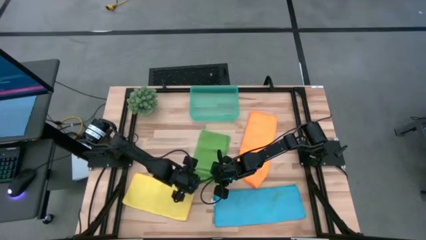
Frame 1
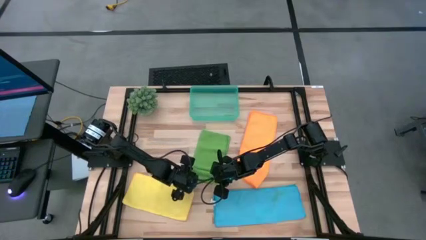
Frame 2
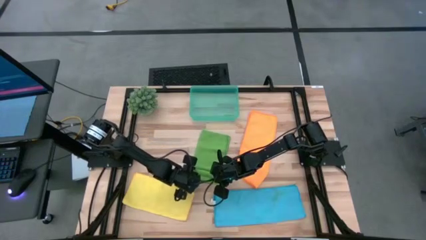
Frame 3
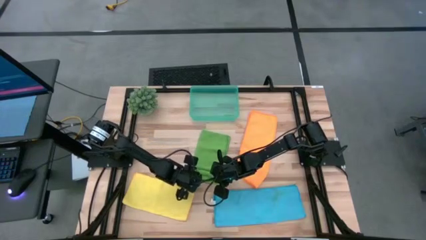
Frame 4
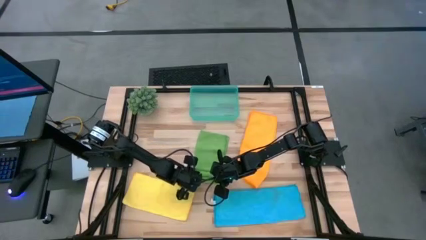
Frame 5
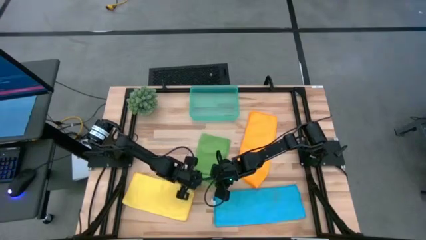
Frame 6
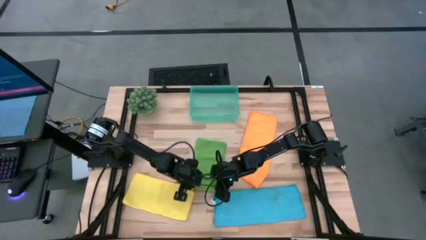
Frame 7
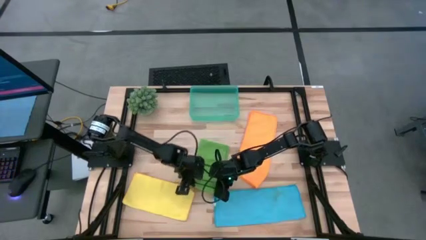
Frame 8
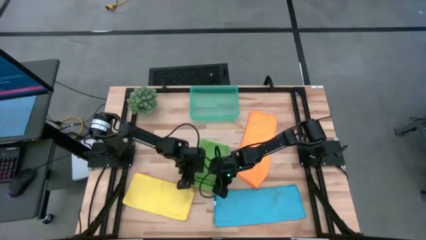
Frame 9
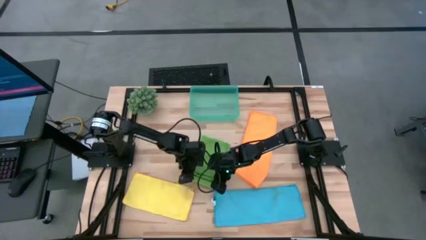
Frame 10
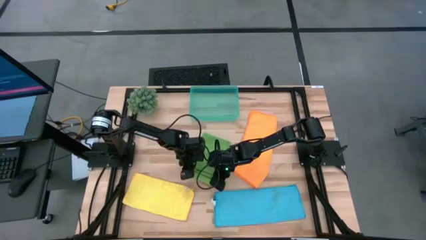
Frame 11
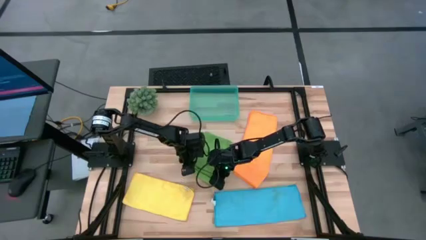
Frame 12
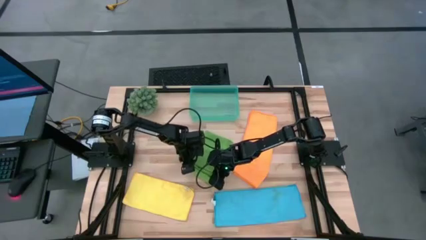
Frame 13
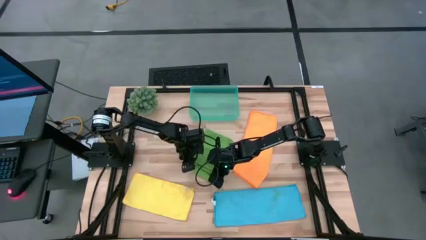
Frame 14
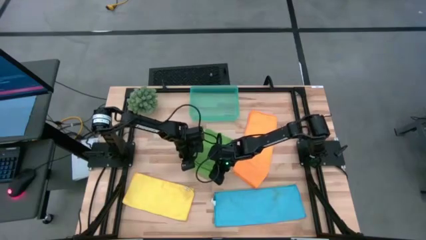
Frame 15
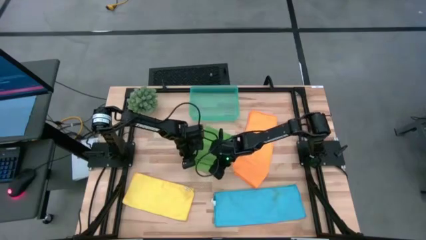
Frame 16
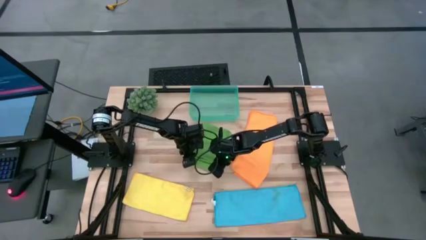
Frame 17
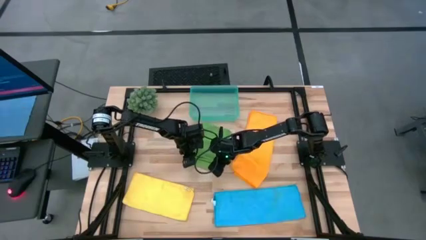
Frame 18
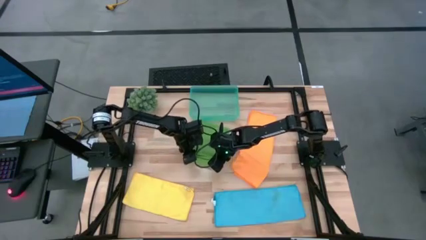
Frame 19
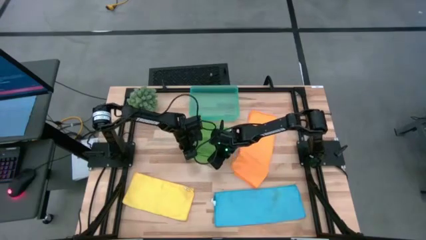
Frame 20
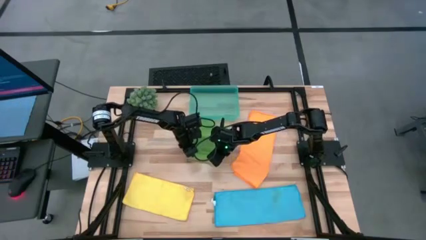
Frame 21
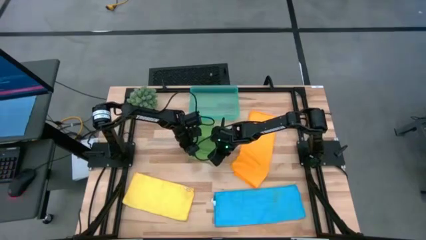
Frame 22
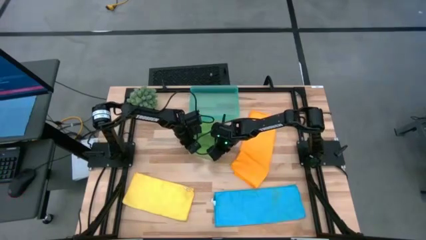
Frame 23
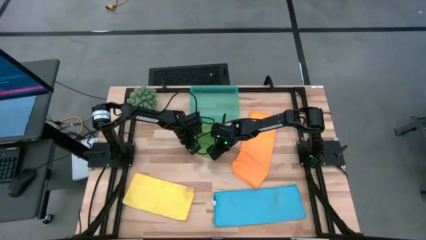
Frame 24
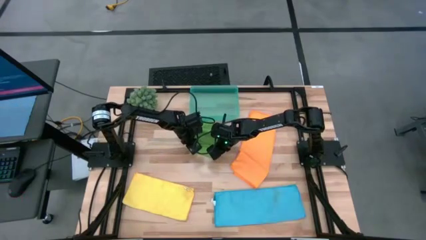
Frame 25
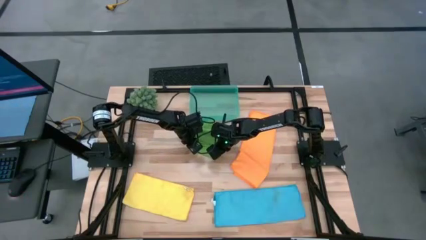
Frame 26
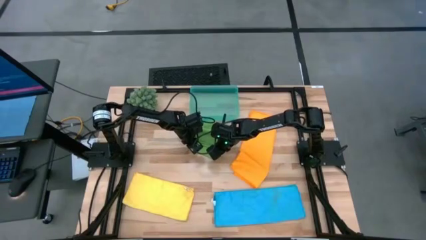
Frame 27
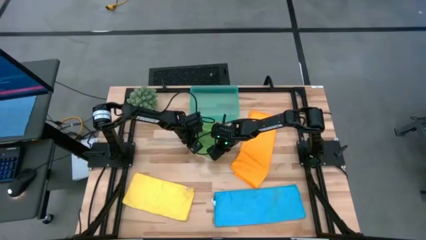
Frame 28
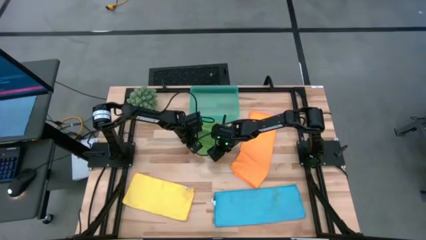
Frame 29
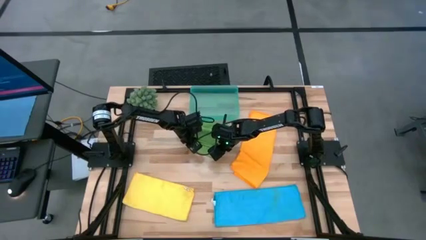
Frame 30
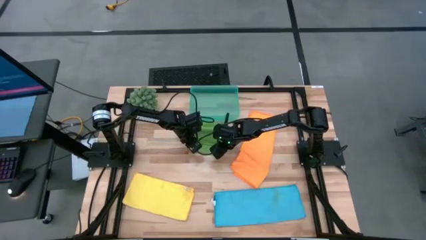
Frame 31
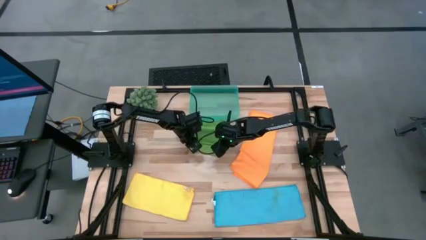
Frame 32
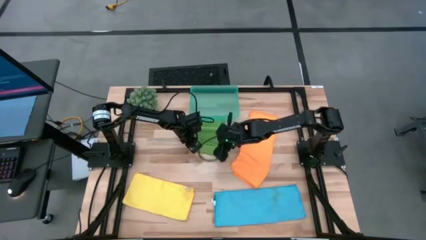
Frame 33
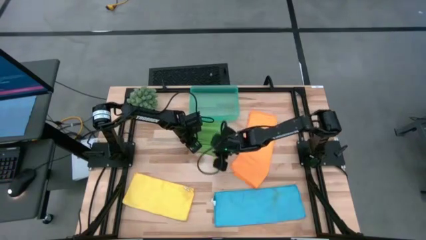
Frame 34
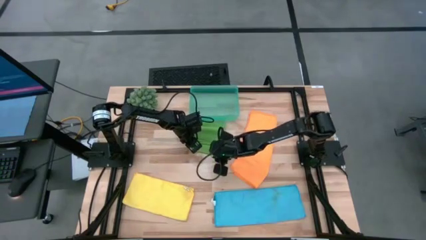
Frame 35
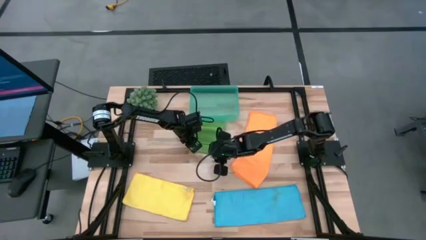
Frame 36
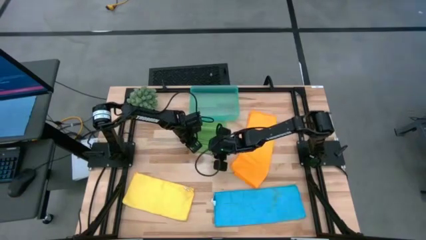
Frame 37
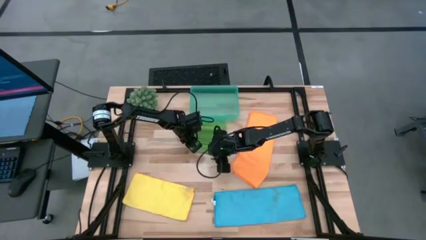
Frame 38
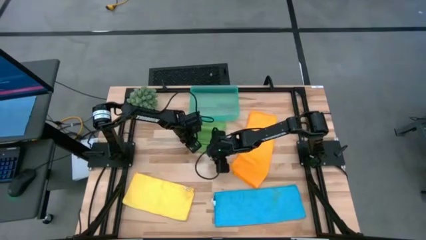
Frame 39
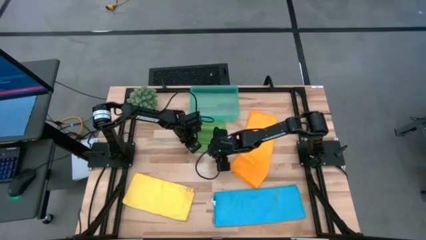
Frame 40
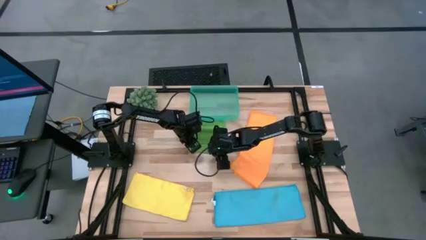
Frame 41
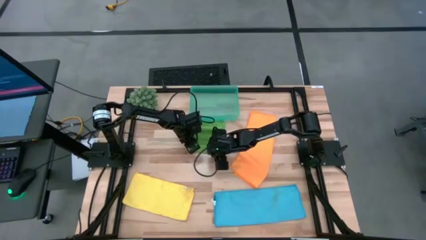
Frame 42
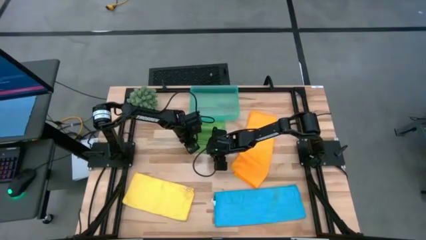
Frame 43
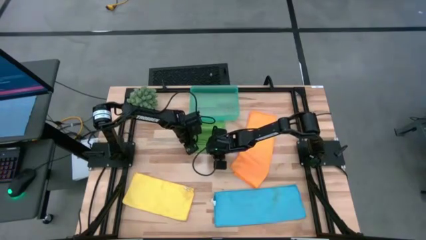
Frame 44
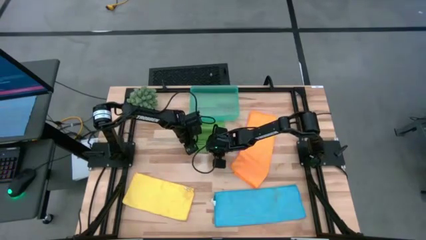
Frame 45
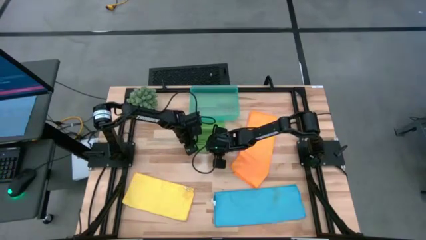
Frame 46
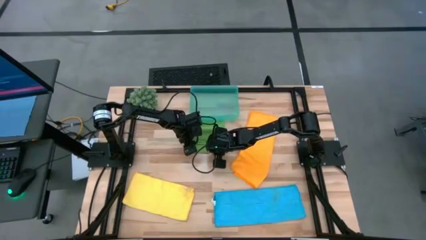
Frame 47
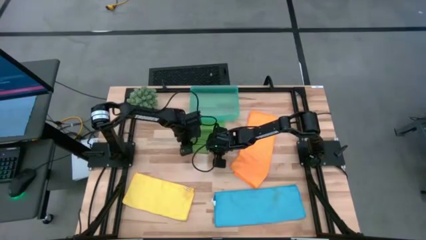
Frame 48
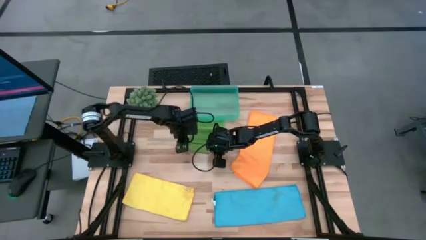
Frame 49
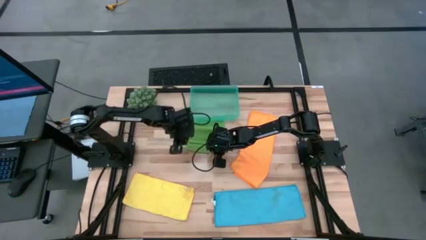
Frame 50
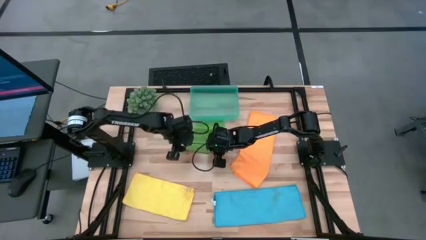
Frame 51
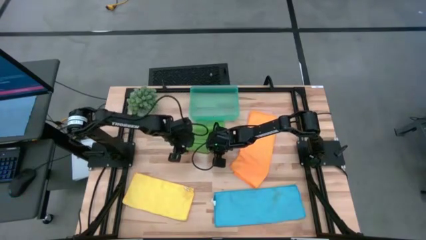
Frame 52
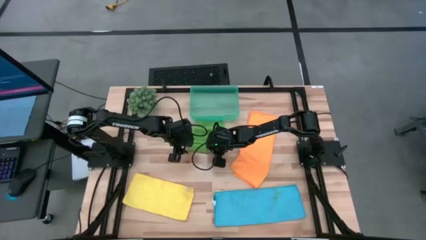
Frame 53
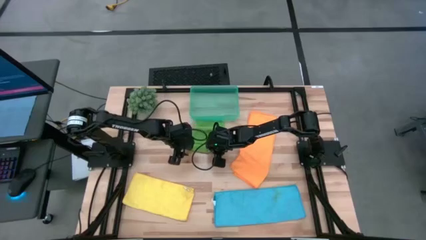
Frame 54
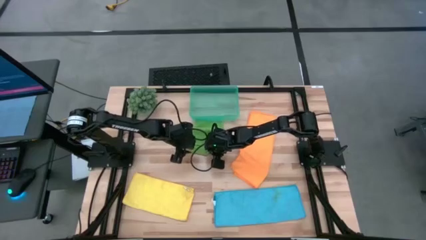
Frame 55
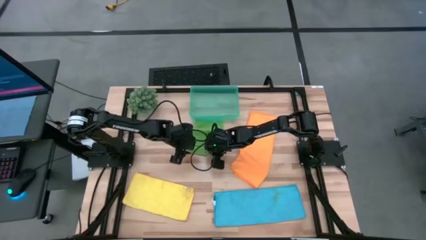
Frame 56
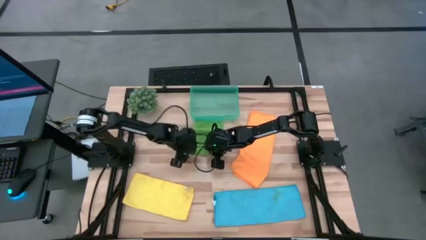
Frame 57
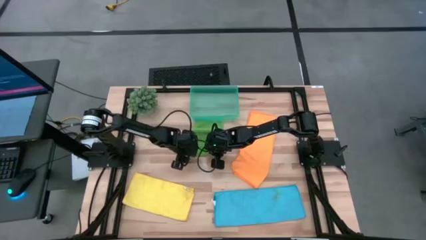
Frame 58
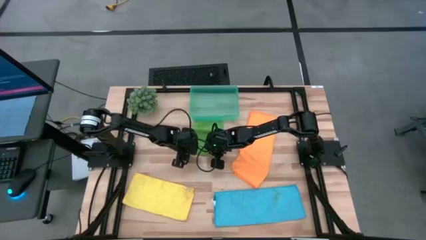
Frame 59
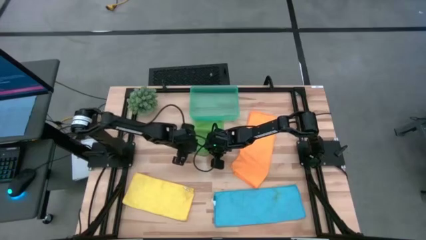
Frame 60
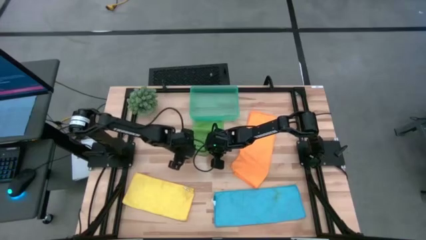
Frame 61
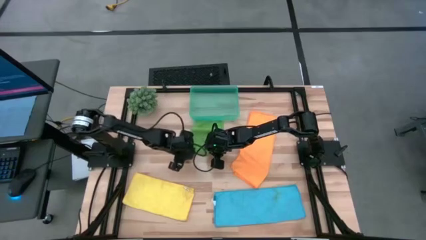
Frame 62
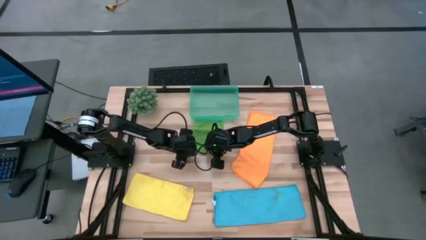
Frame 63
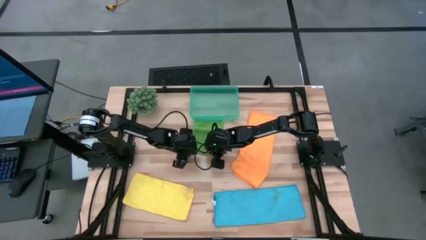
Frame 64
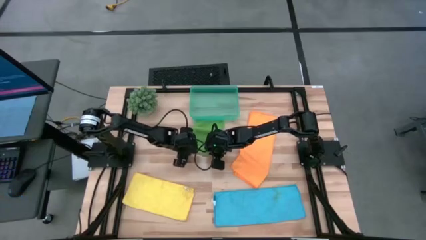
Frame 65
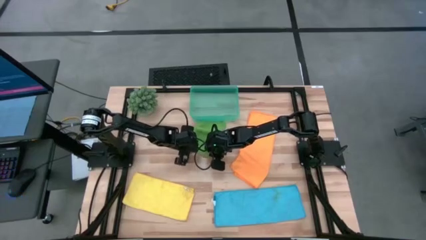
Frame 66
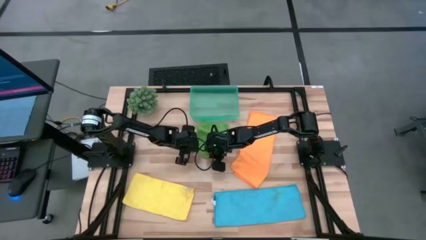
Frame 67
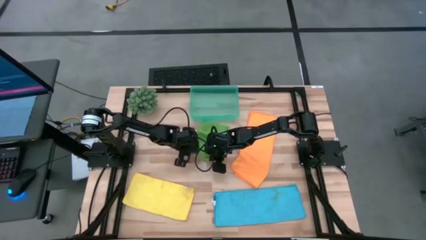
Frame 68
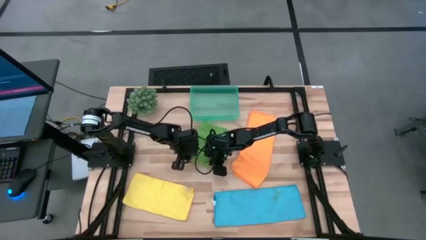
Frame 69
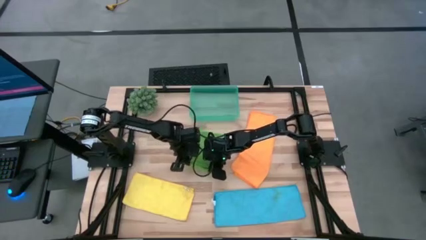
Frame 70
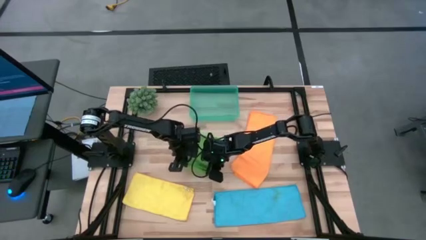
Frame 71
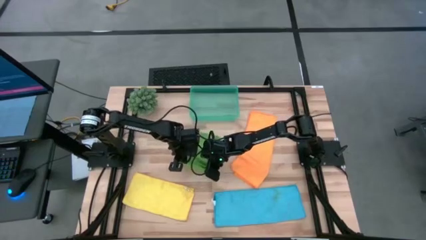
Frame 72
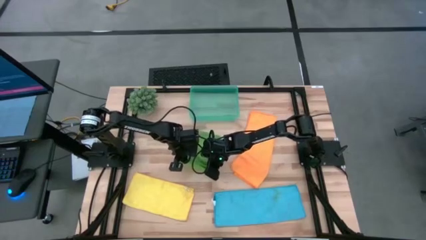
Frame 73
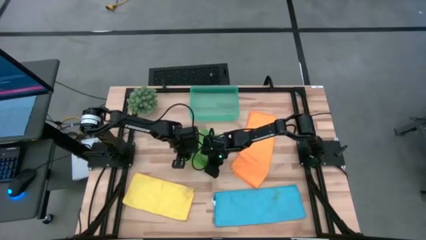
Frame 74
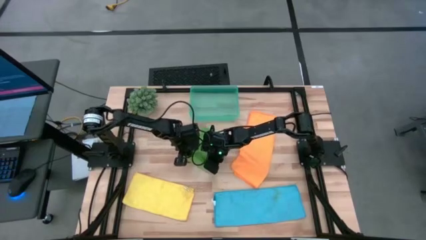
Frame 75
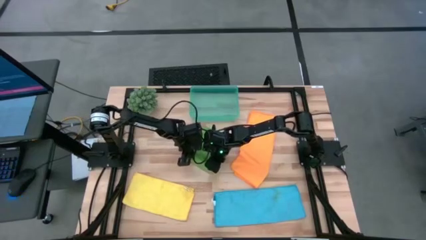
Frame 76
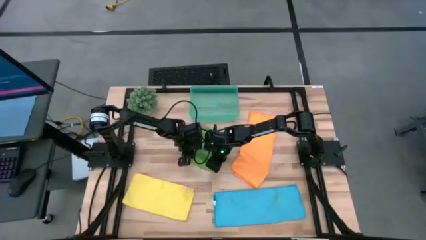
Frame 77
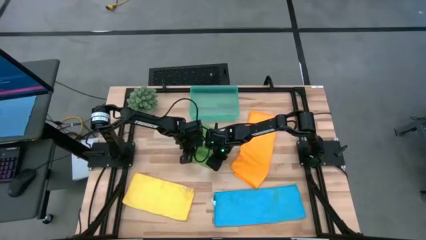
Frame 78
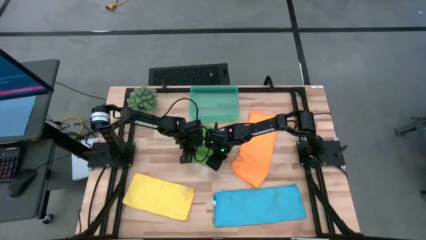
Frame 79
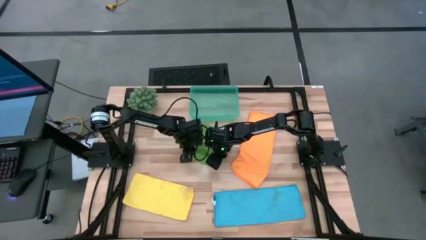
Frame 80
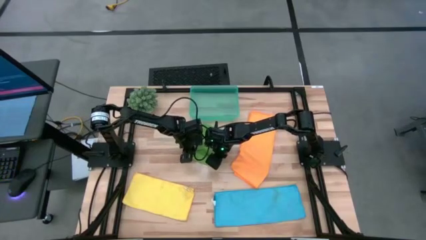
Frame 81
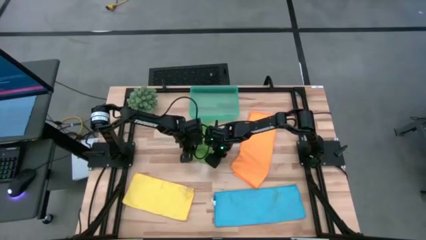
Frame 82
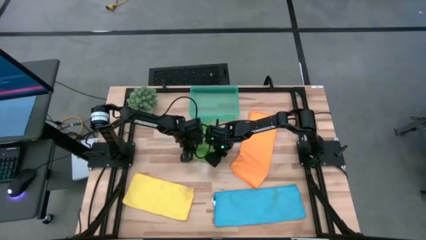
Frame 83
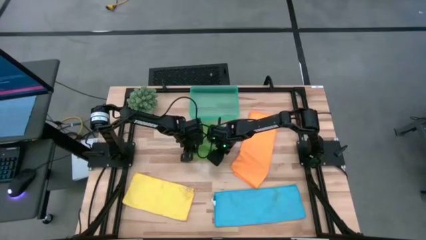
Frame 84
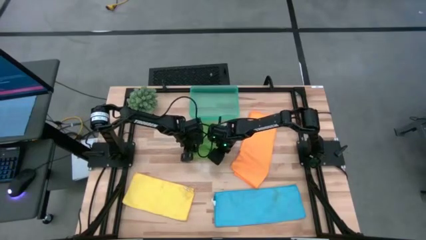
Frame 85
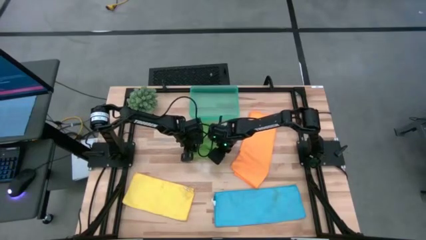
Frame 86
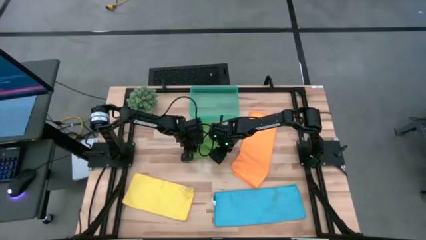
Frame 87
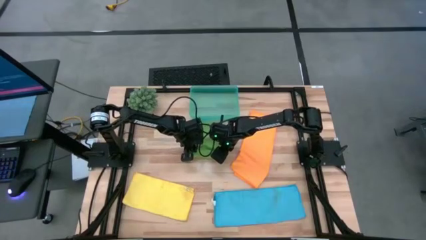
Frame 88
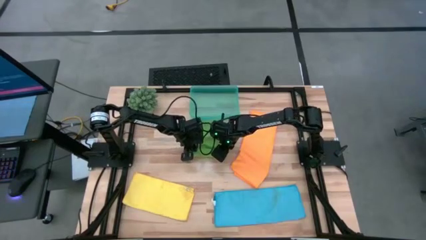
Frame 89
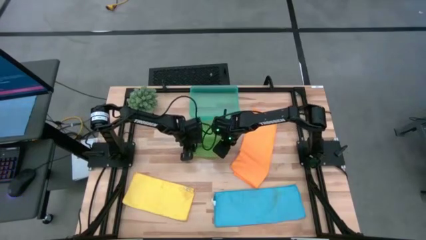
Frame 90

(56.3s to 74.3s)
Task: Roll microfiber towels into tight, uniform cylinder then place into a basket
Roll the green towel
